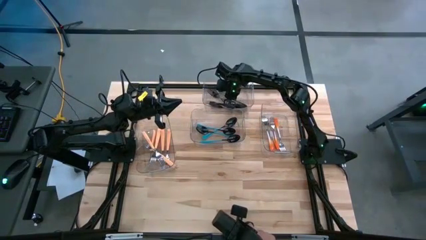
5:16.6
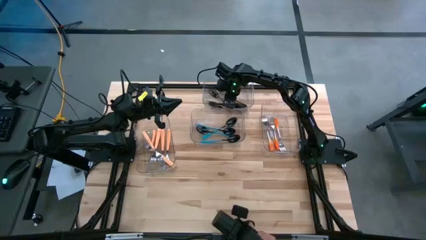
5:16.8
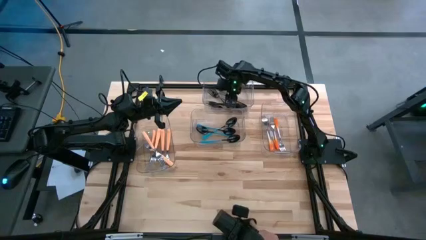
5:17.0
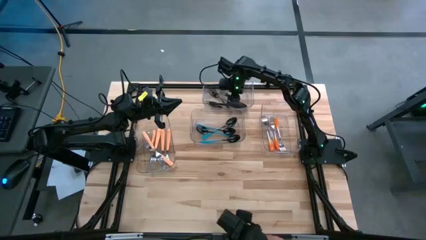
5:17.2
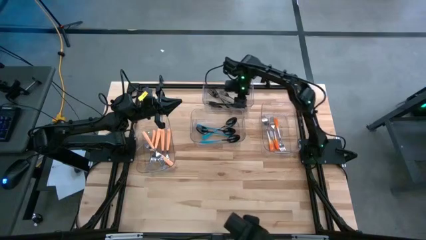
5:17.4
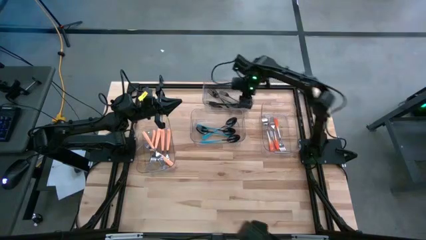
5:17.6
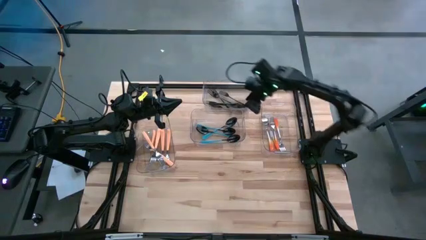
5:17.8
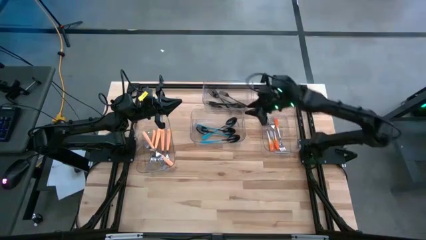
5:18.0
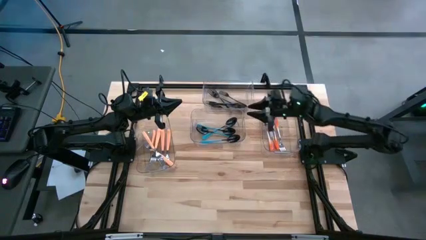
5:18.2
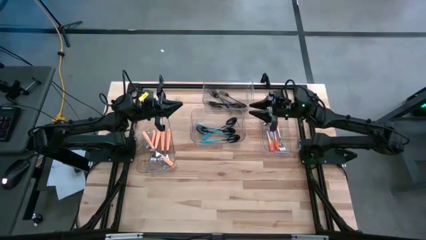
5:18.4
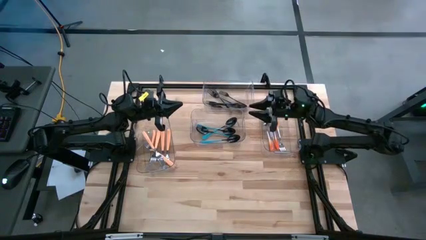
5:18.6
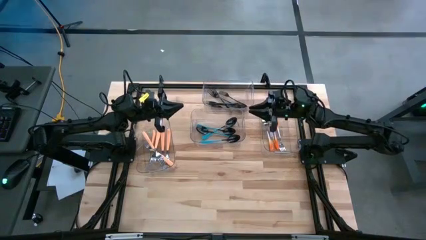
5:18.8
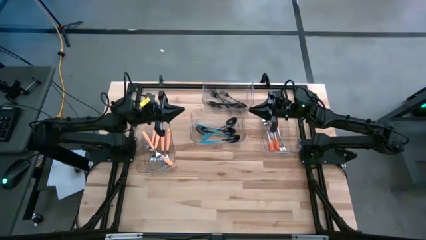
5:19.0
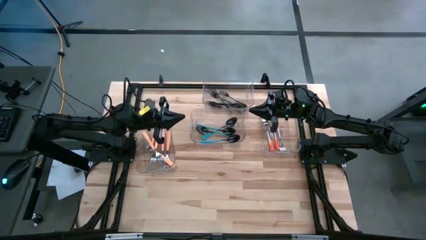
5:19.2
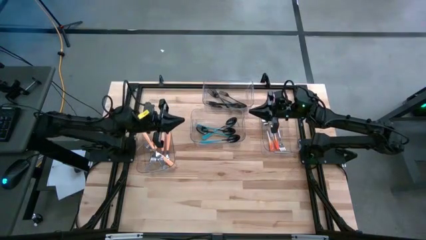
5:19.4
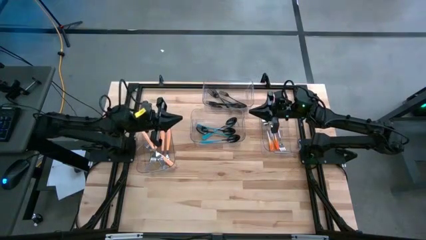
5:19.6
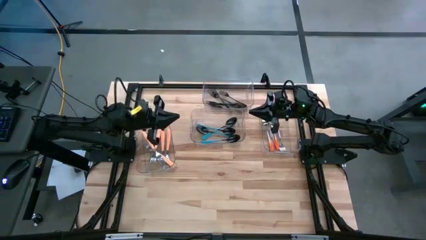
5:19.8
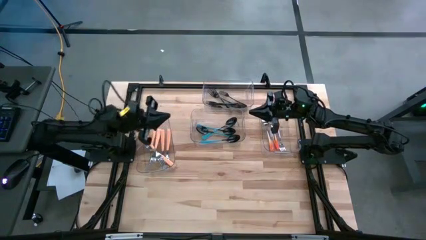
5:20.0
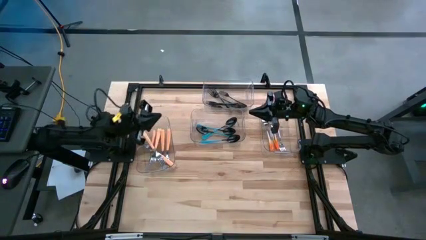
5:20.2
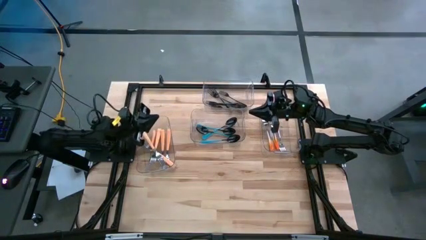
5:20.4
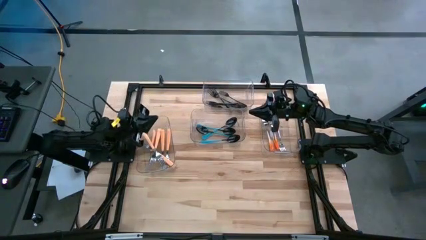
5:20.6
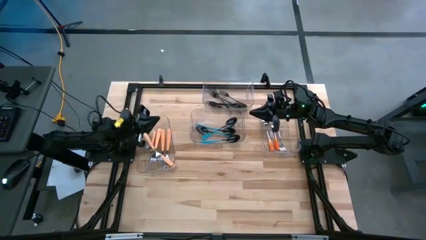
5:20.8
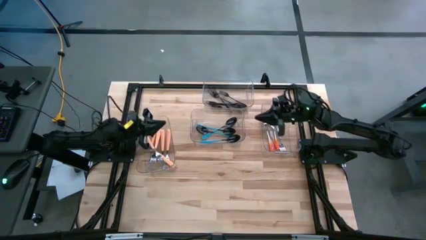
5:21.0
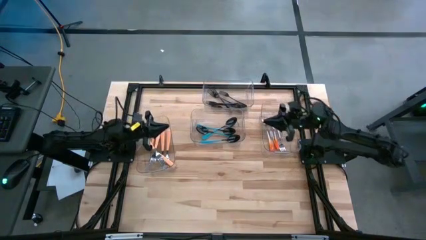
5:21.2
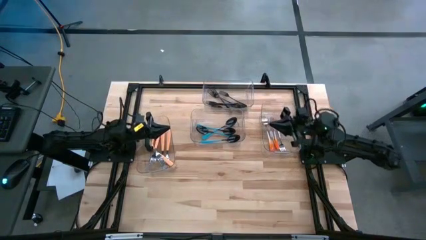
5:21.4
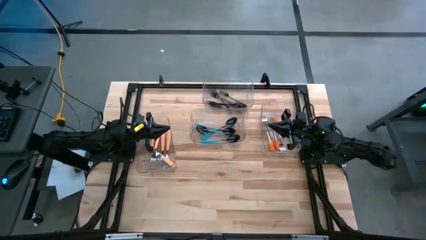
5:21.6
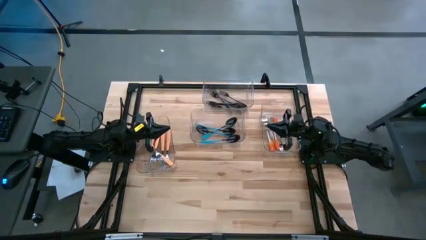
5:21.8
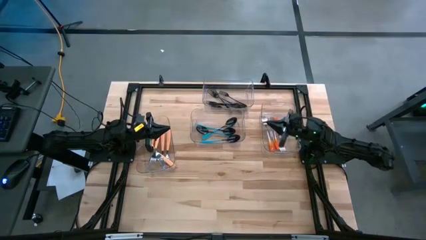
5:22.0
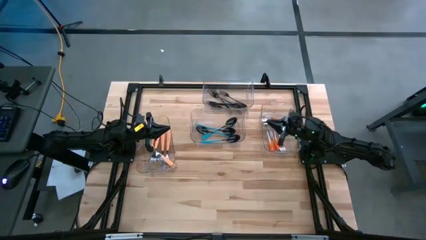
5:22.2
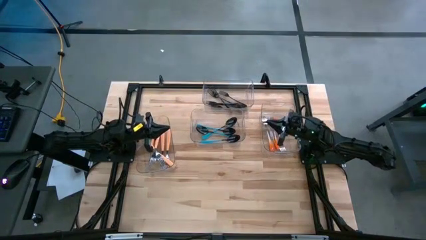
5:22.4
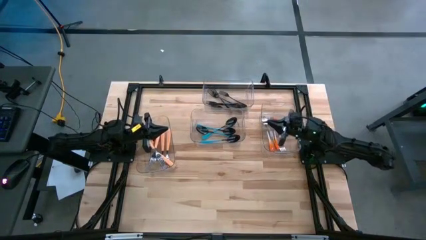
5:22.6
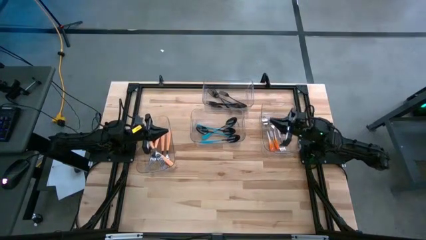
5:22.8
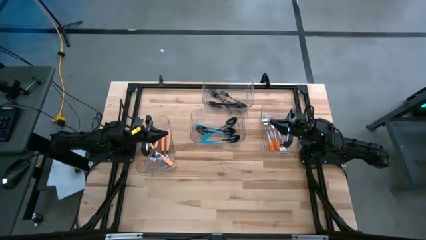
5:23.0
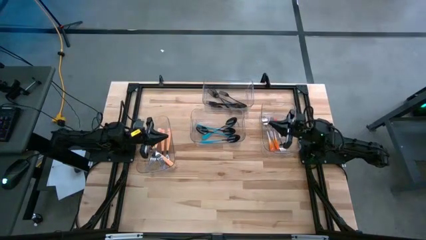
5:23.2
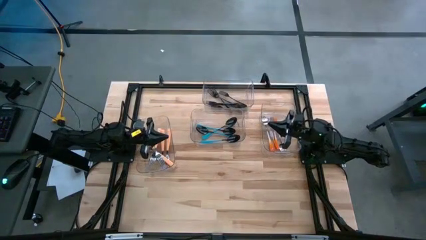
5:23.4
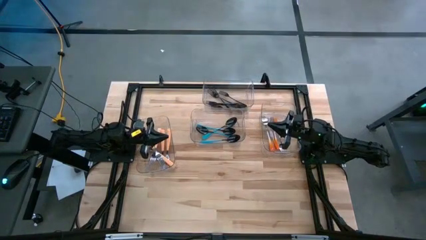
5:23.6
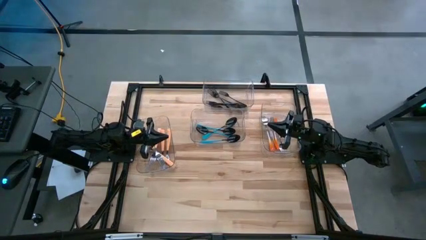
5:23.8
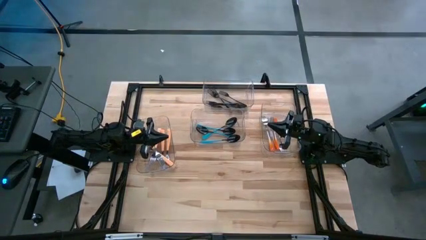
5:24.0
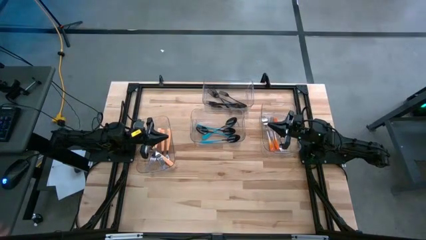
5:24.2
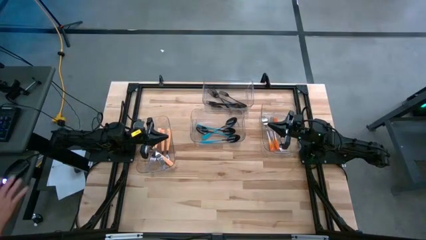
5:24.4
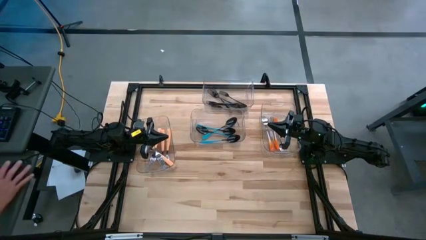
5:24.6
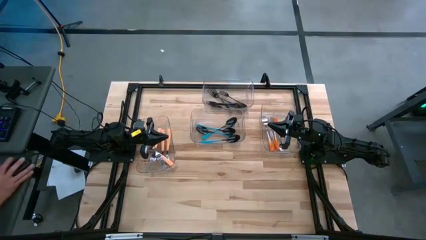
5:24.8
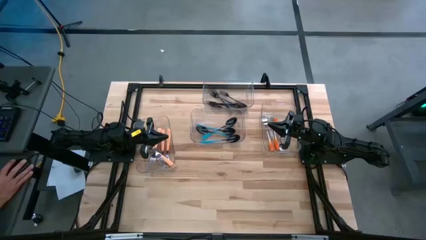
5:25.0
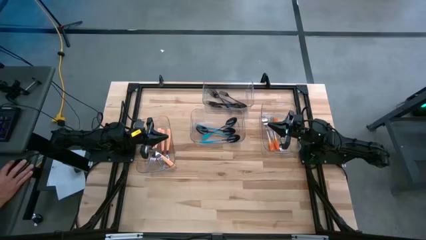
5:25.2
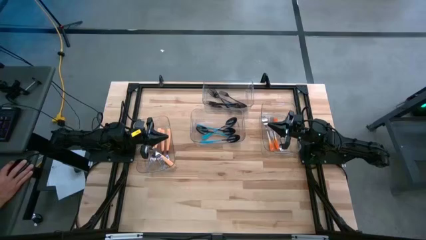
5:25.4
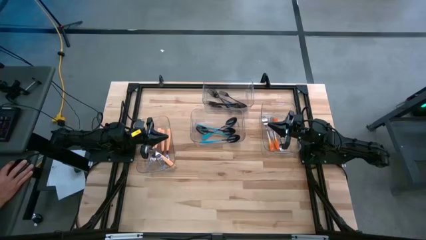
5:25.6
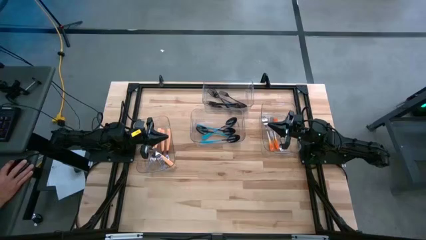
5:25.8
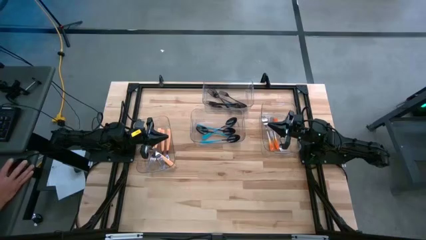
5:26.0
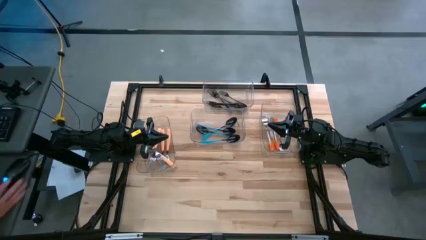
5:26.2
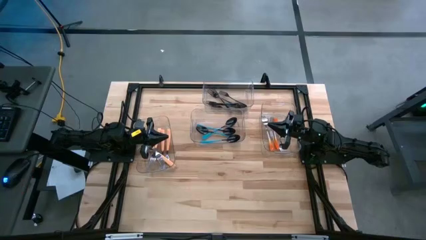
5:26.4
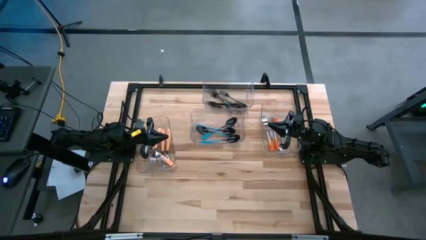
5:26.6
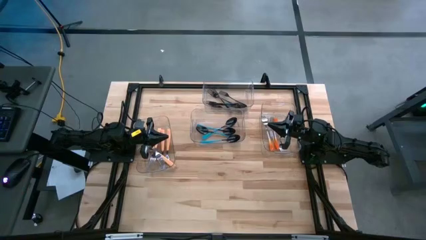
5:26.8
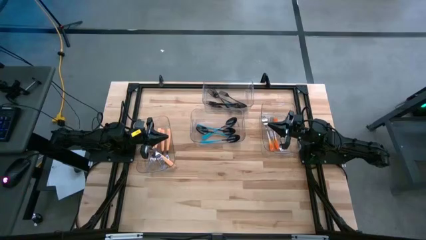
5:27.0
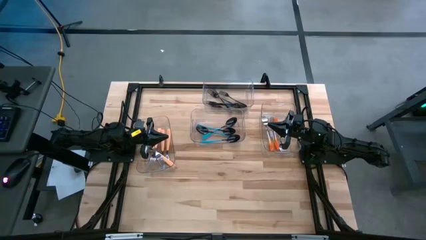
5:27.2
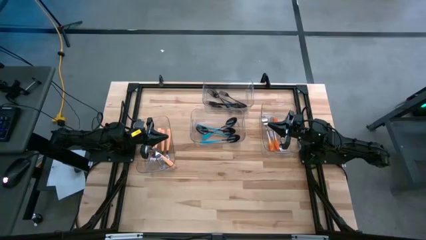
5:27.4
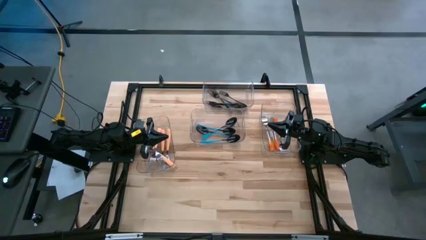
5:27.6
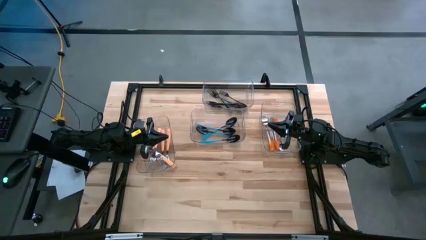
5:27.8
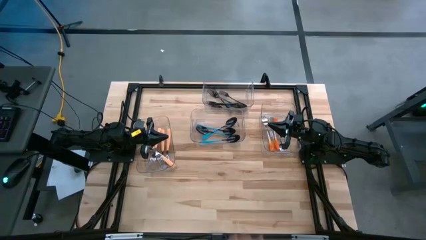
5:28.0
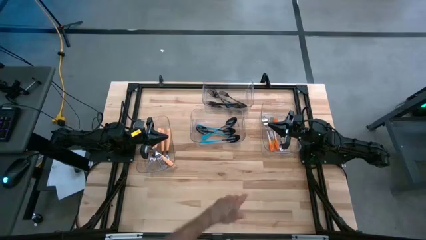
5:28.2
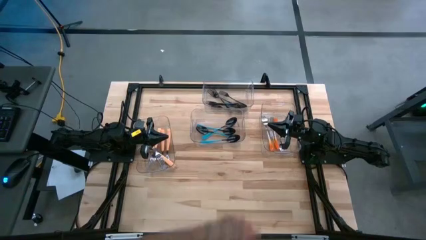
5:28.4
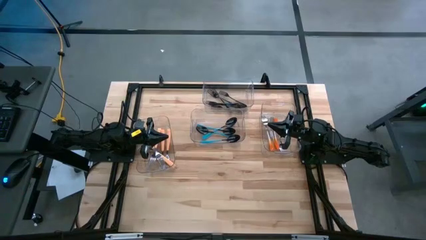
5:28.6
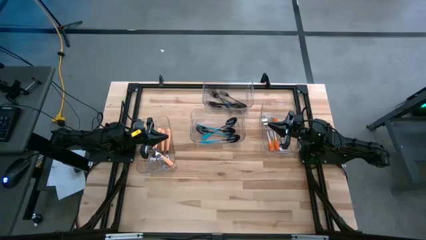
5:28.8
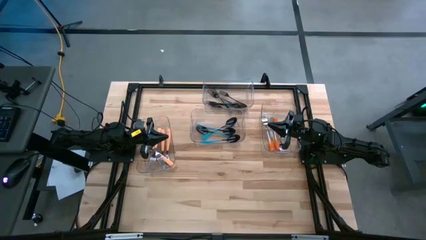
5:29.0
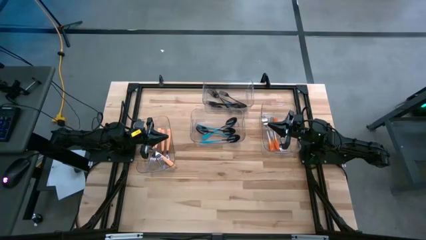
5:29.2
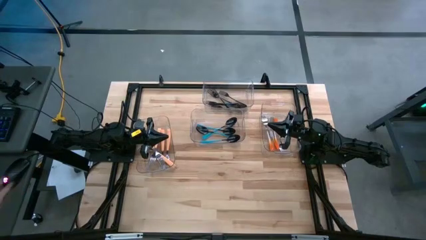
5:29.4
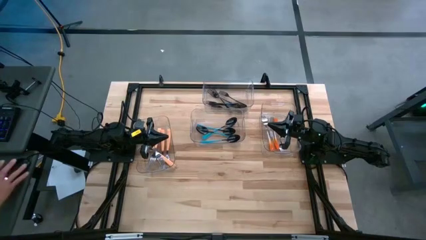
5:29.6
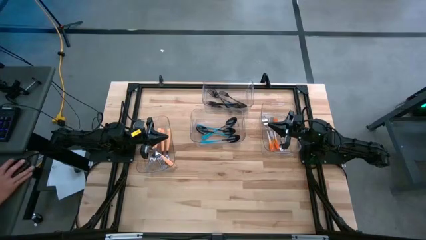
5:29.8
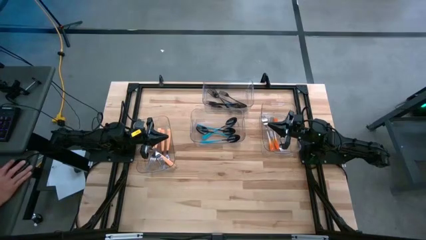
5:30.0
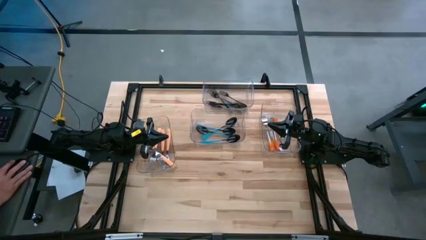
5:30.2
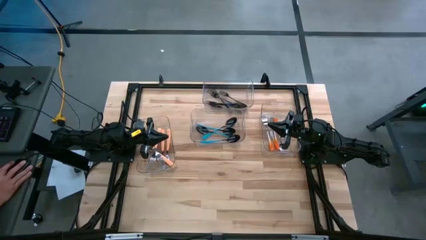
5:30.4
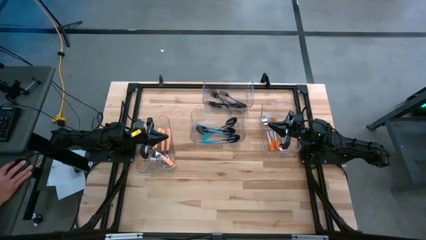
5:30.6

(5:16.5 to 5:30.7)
Task: Sort silverware by color (type)
Return to Home Position
